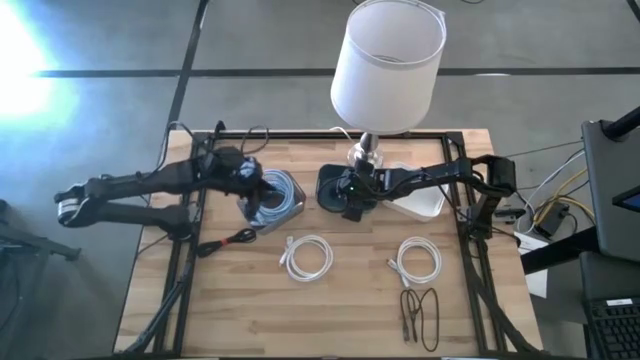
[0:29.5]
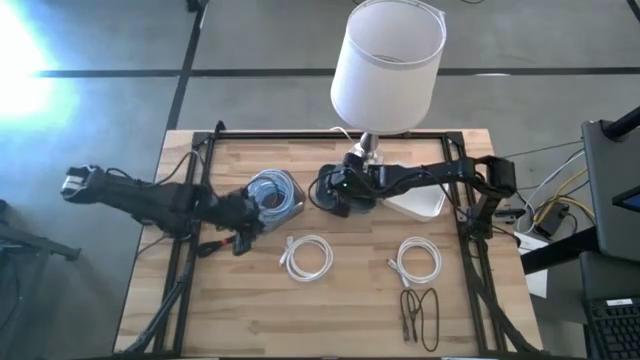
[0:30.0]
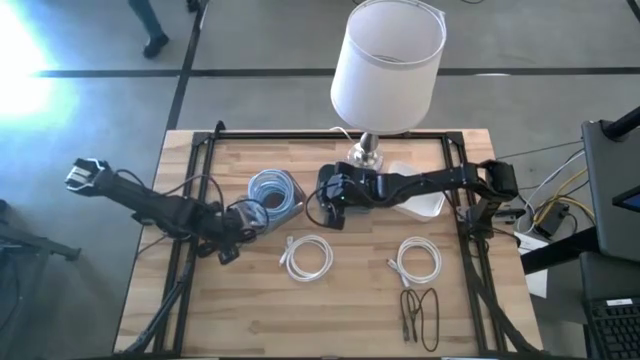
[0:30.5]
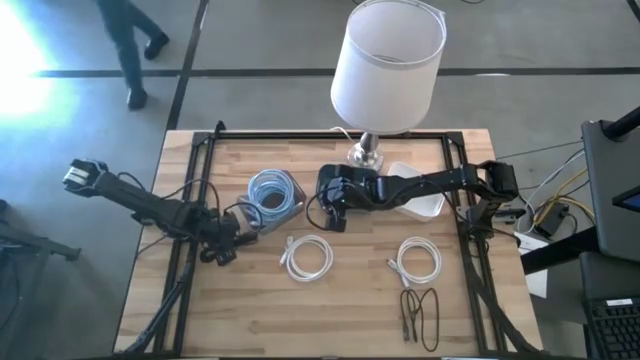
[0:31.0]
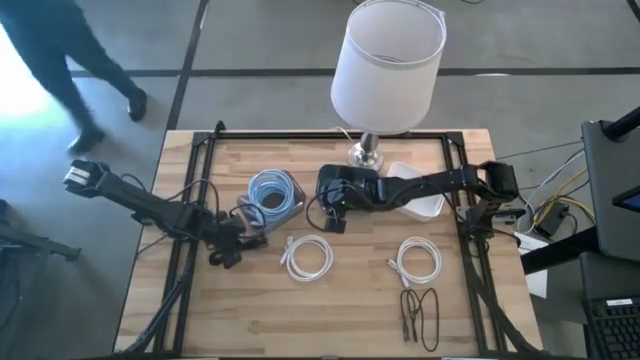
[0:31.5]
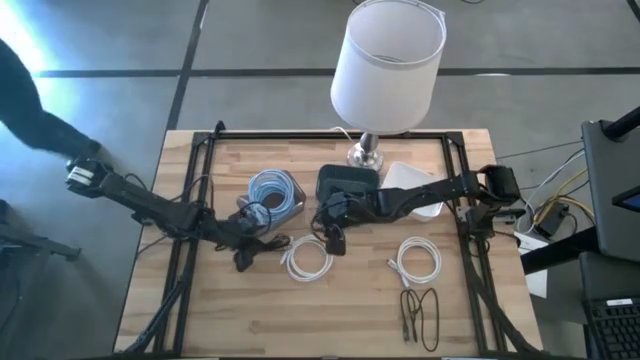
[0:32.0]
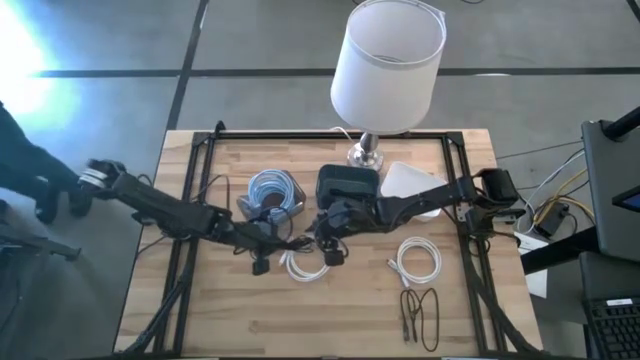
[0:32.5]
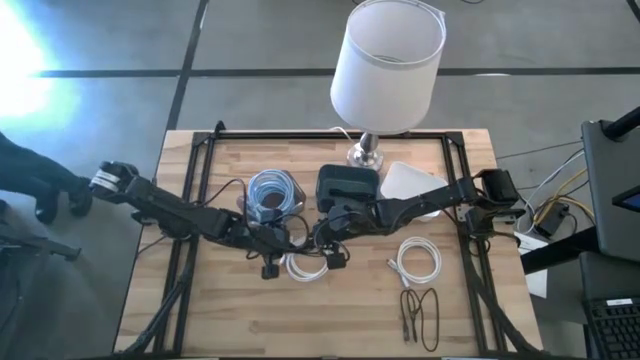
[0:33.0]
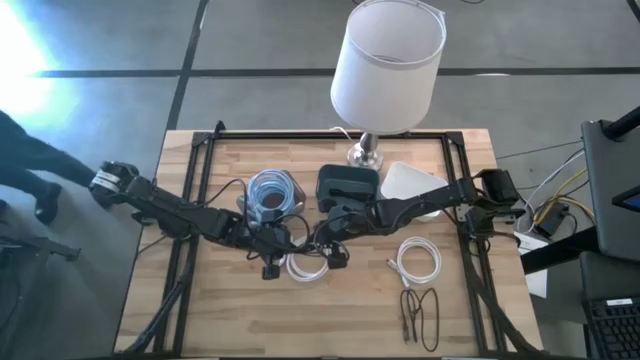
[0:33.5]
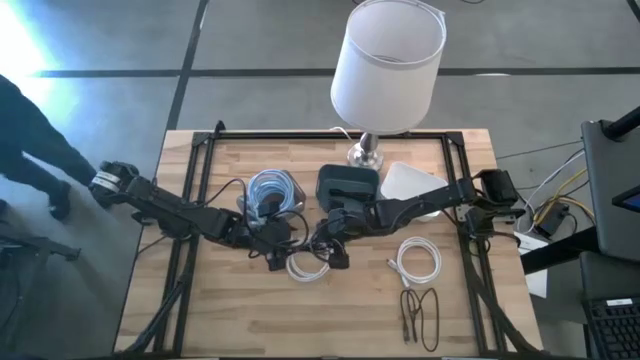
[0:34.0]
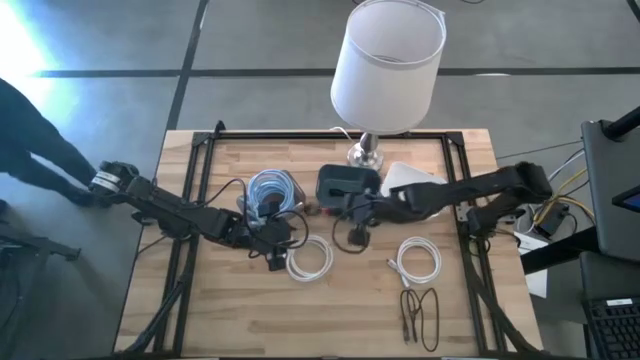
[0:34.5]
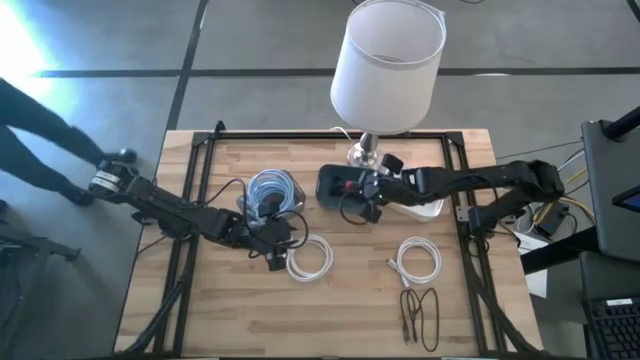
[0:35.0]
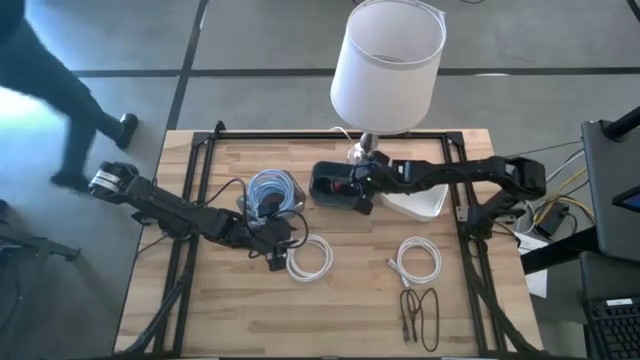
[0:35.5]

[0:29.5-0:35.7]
Task: Pick & Place USB Port
Put the left black USB cable into the blue bin

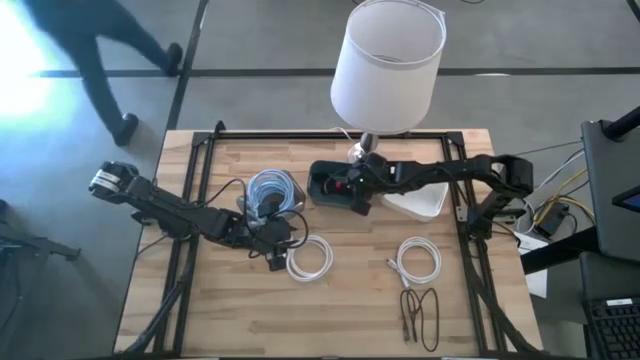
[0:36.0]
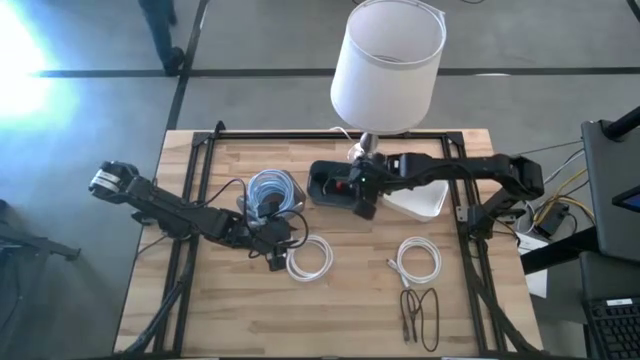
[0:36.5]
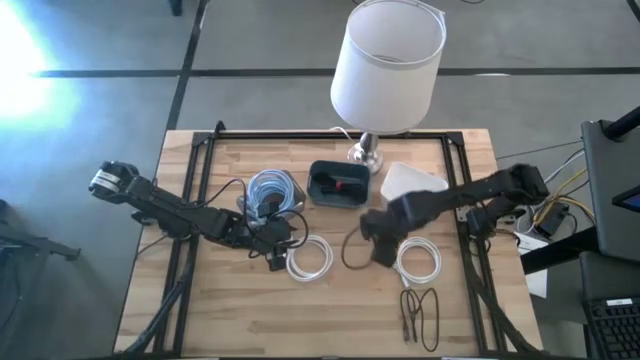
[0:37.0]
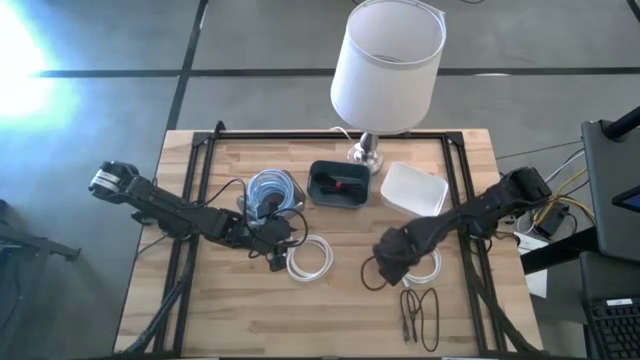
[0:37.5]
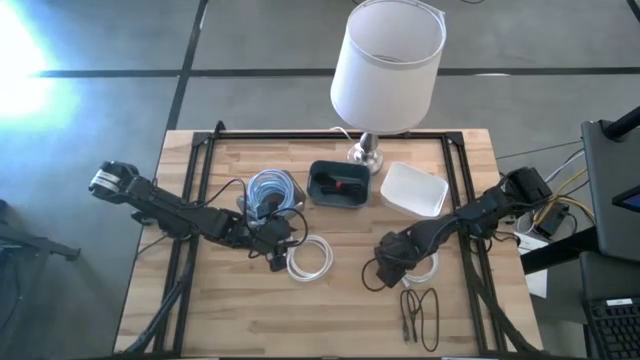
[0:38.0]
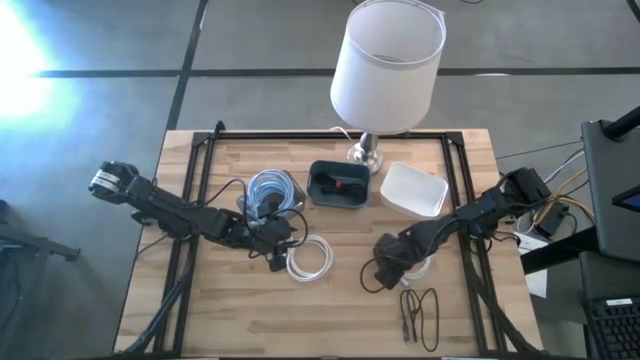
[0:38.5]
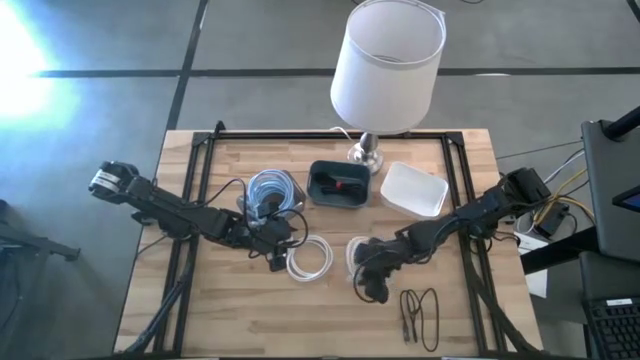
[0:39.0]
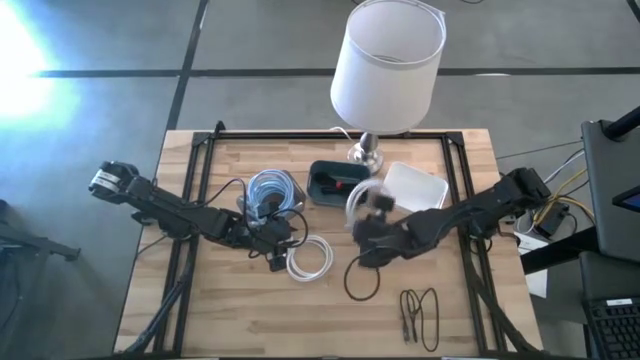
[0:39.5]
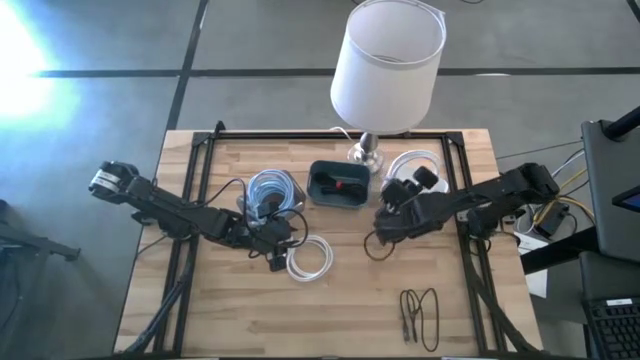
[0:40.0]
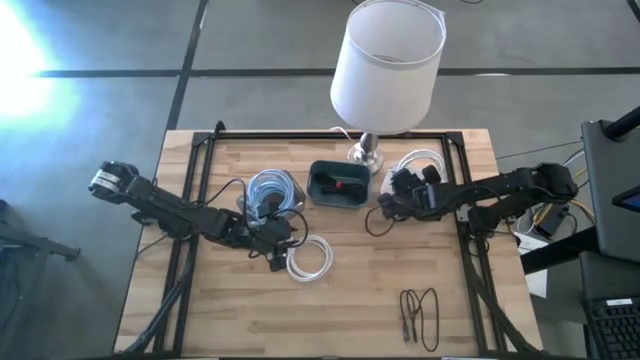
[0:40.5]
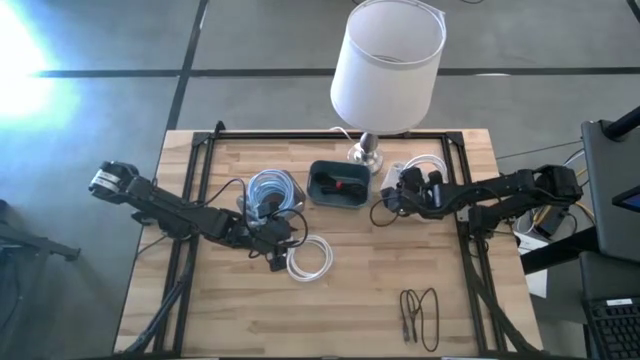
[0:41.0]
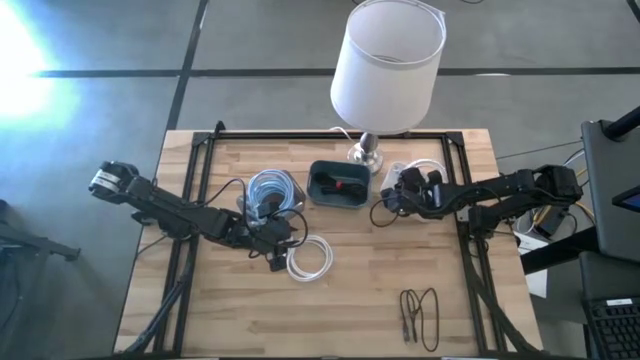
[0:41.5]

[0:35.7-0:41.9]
Put the right white HDMI cable into the white bin

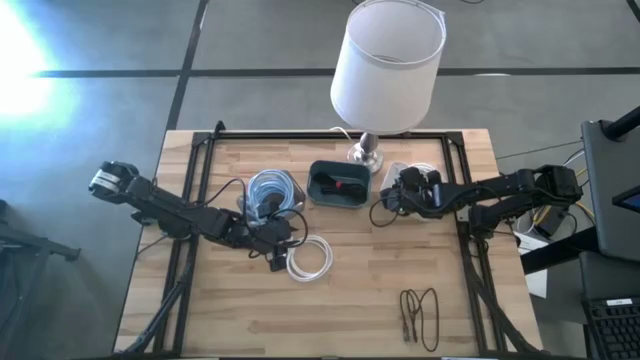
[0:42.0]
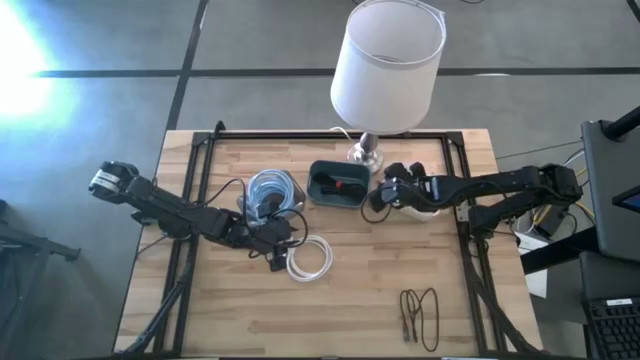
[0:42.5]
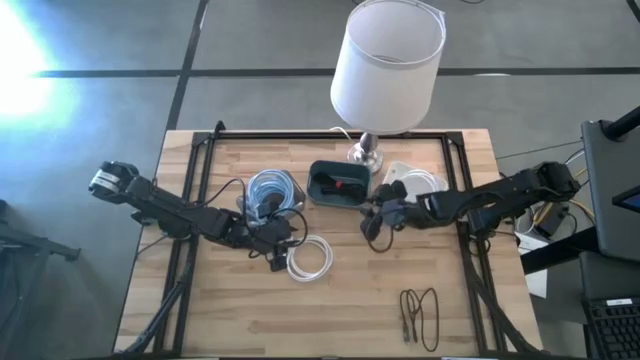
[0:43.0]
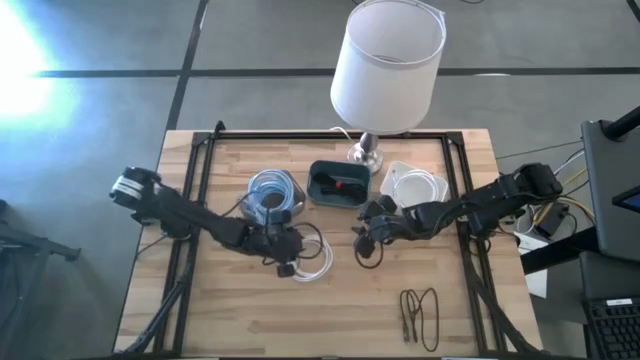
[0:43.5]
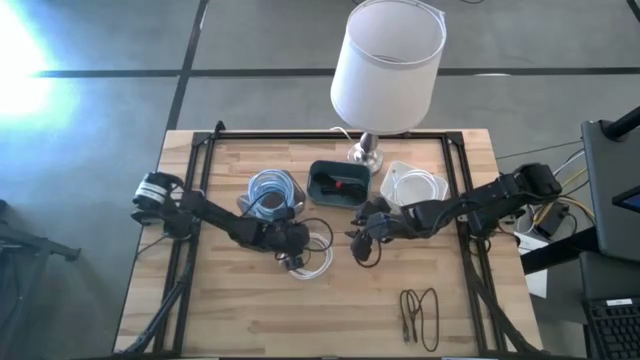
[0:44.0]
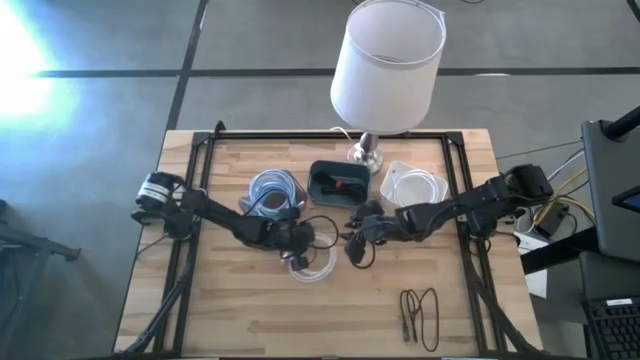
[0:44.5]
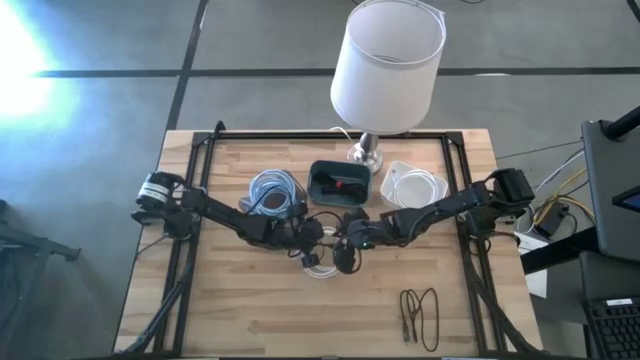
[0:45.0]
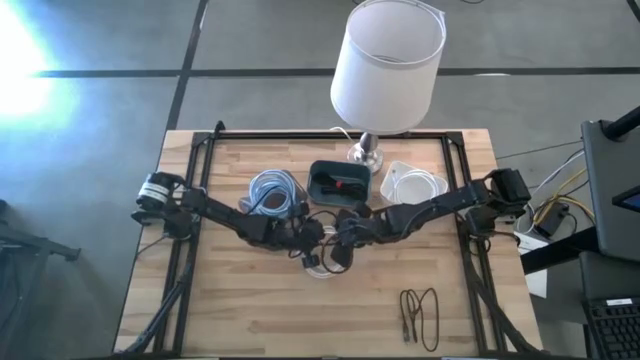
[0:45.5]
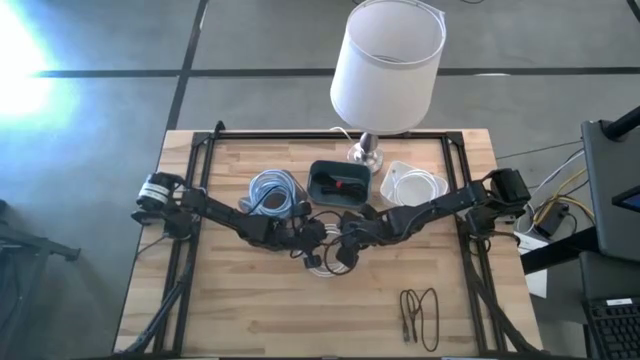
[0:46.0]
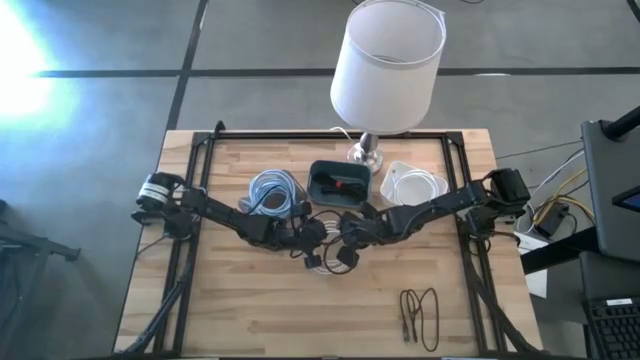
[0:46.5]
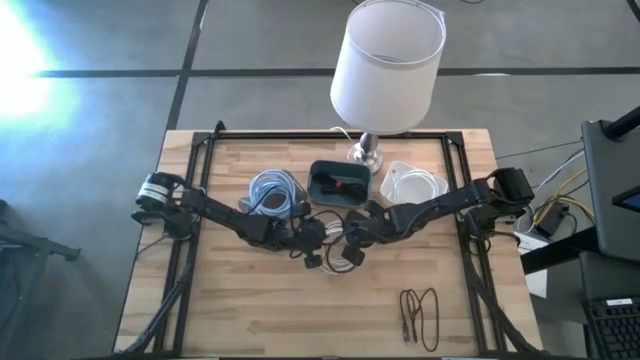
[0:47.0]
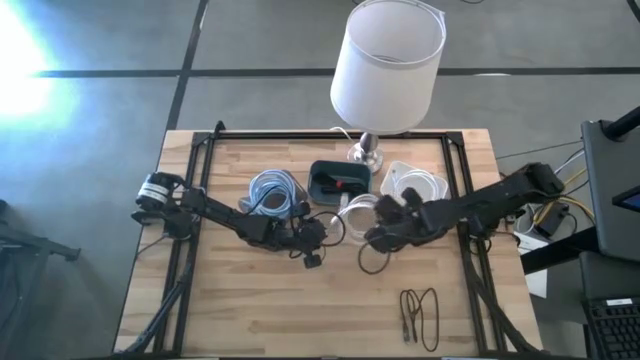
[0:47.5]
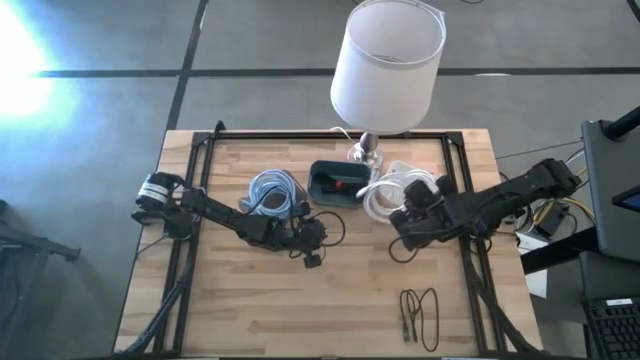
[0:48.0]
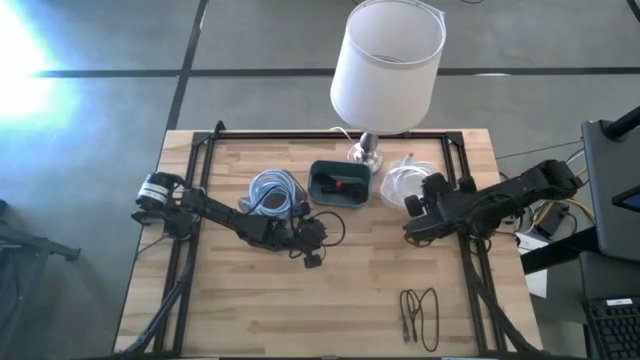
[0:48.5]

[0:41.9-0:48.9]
Put the white HDMI cable into the white bin

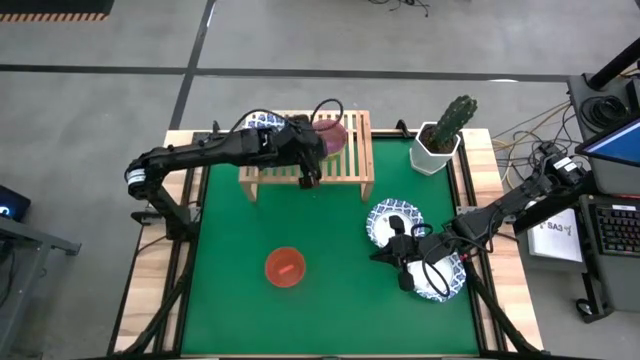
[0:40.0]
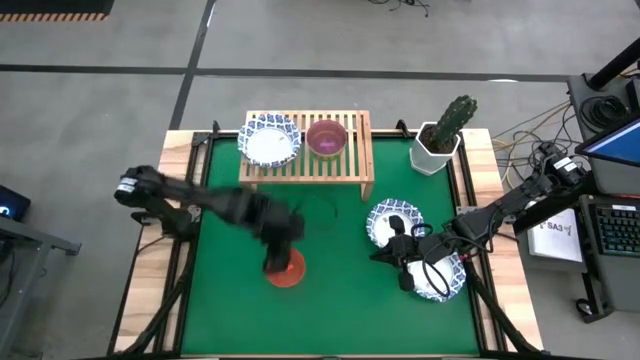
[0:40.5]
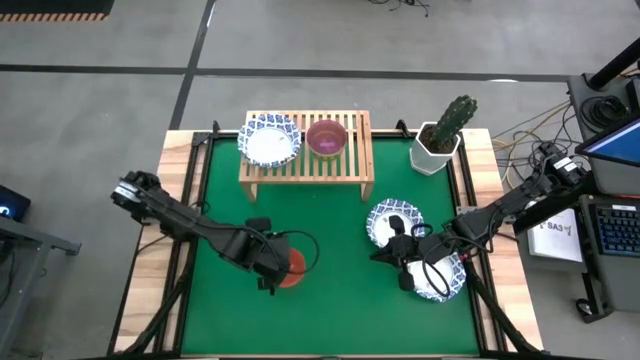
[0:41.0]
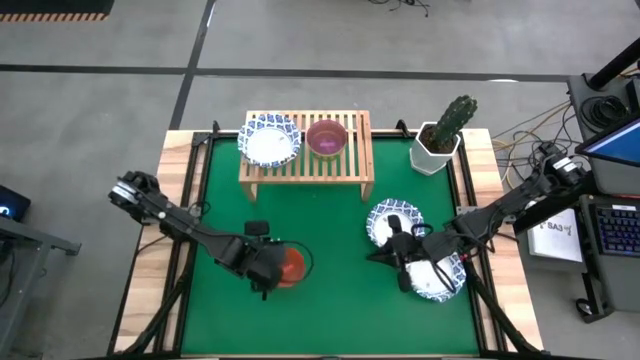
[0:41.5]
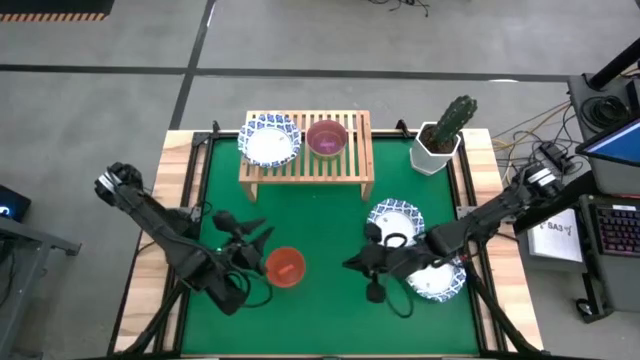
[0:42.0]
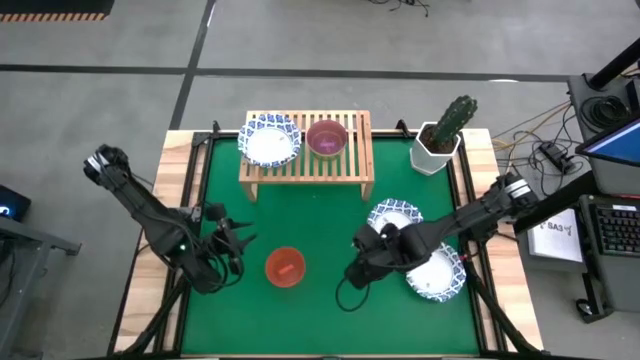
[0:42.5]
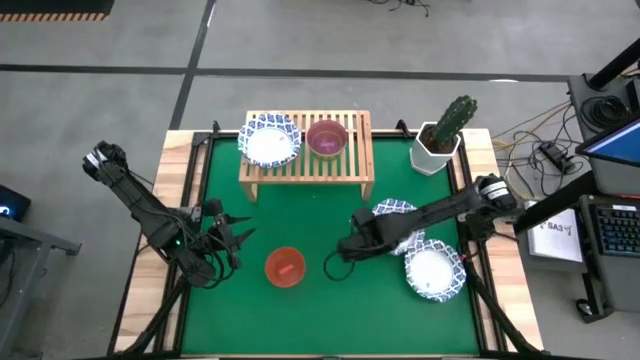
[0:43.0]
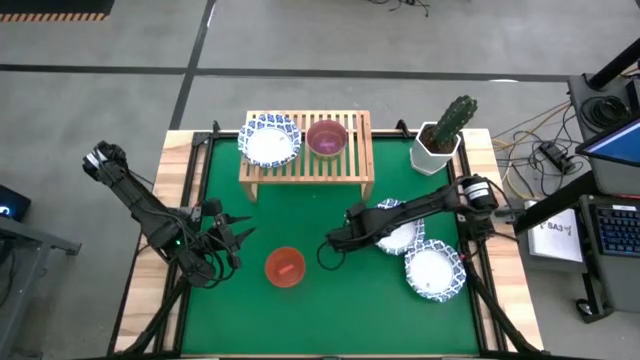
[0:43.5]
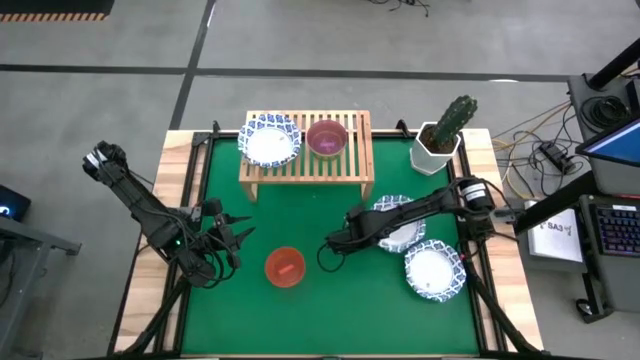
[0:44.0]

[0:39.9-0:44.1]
Task: Place and stack bowls onto a shelf
Stack the large blue patterned bowl on top of the large blue patterned bowl on the shelf
